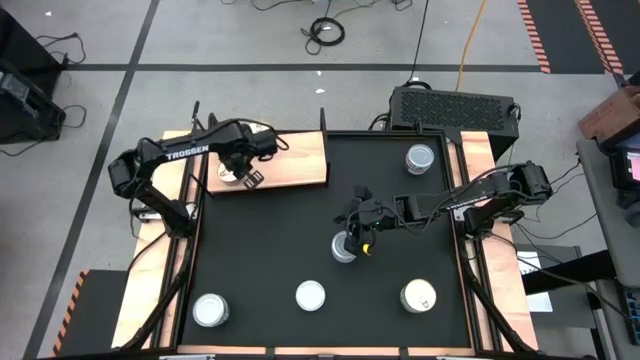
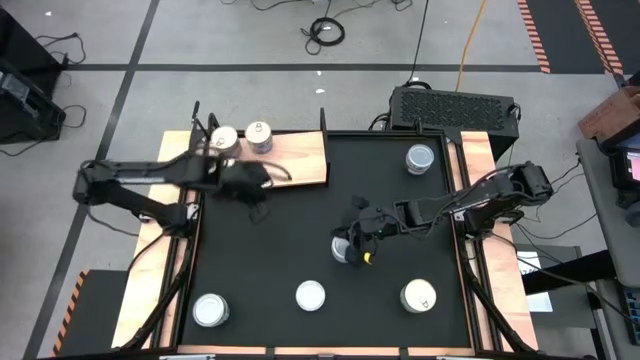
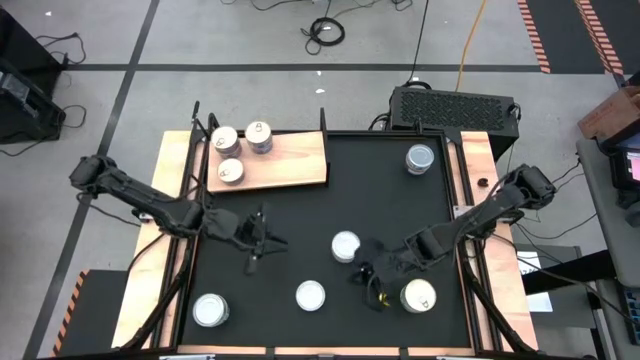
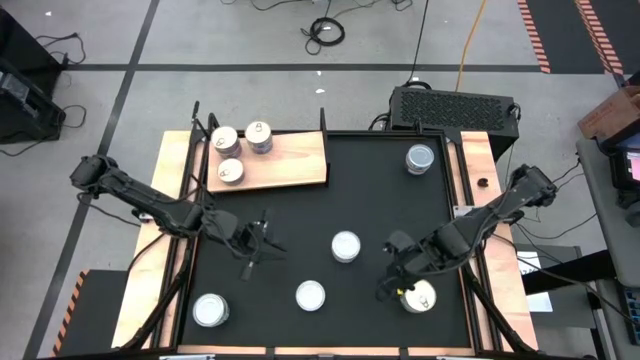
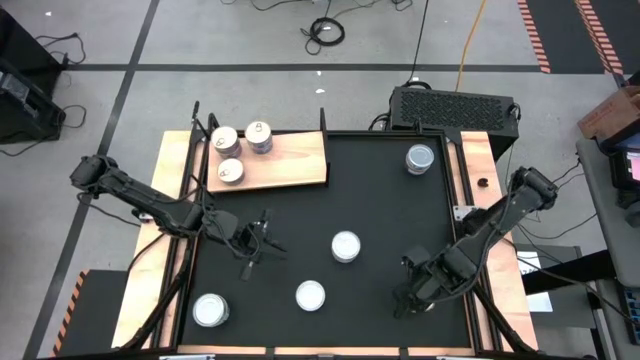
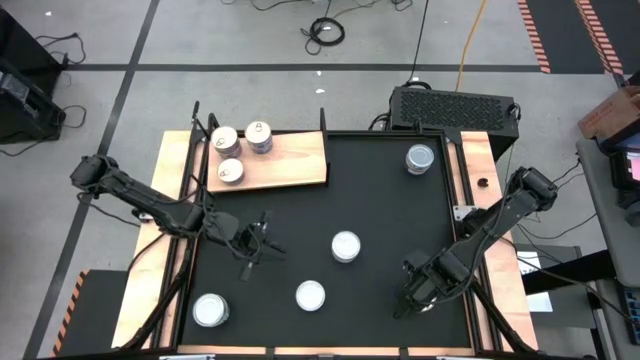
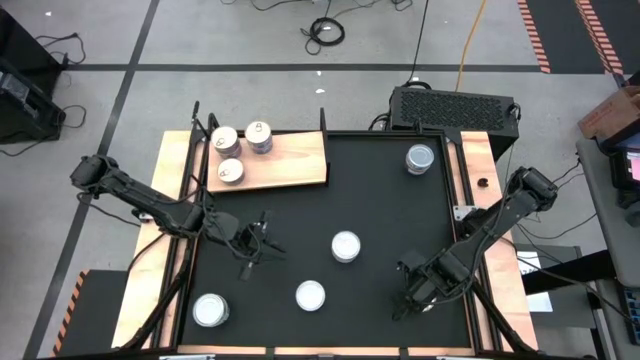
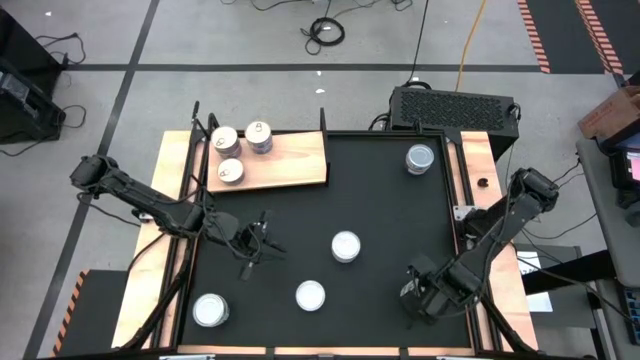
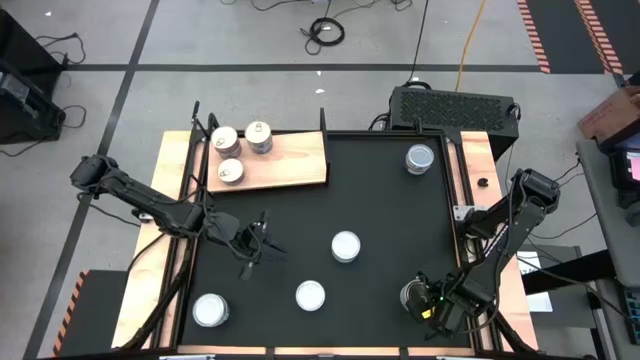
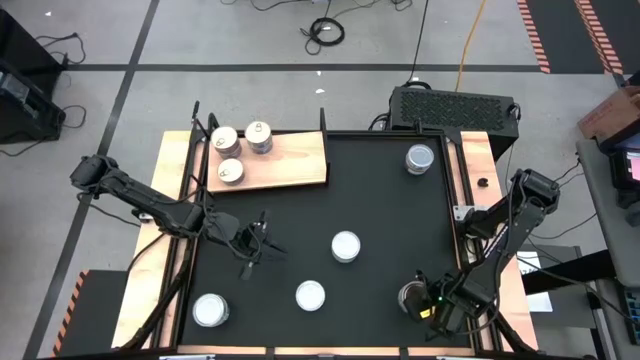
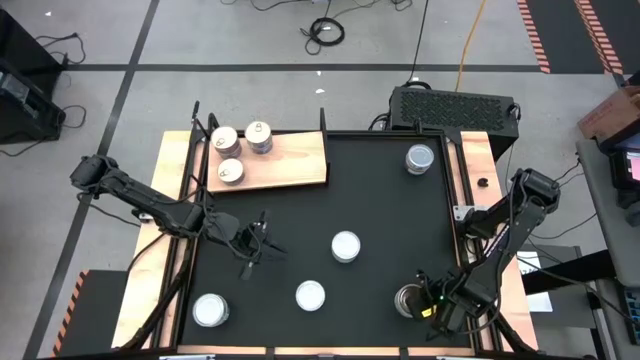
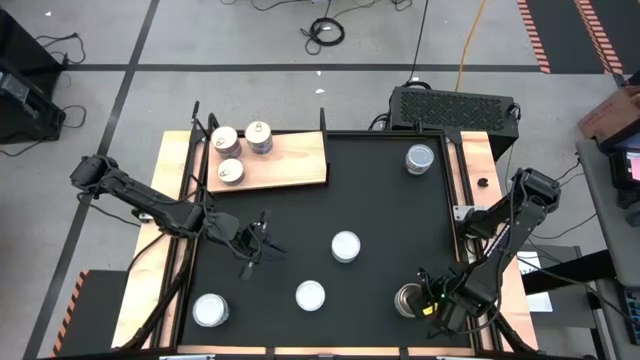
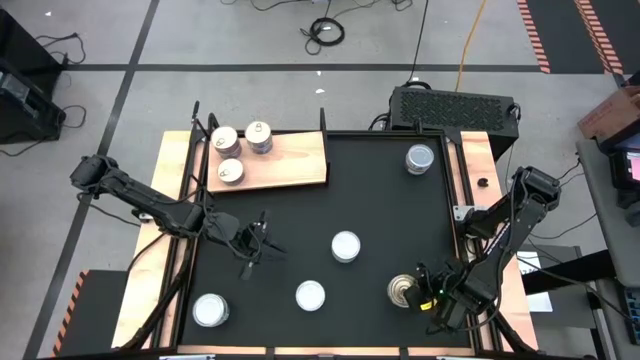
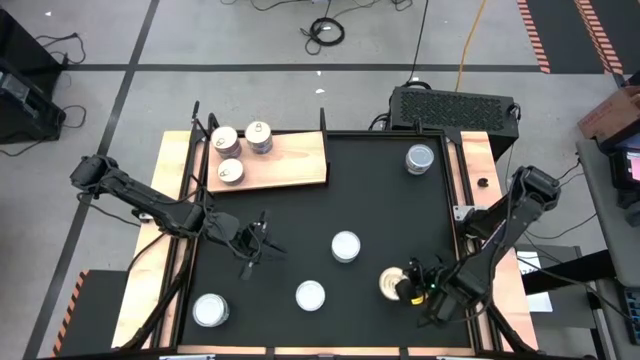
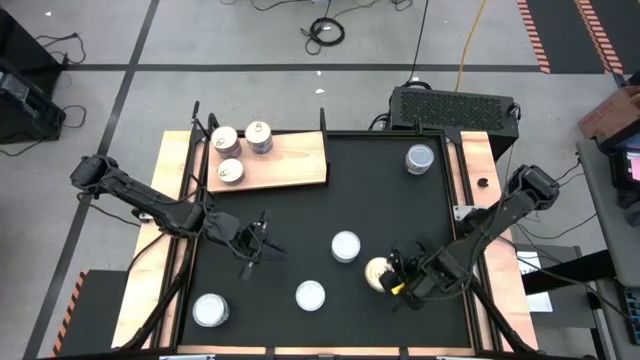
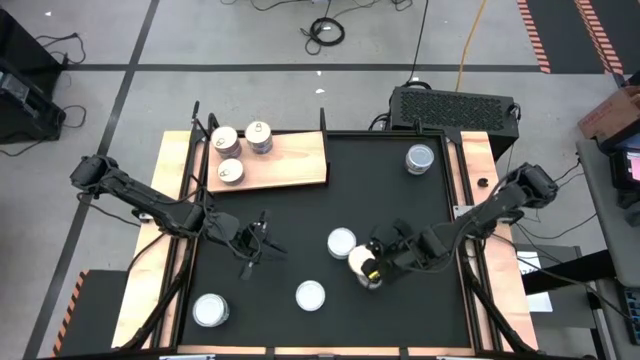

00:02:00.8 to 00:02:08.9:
Task: Stack canned seafood by type on shelf
Put the blue and pink tuna can on the shelf

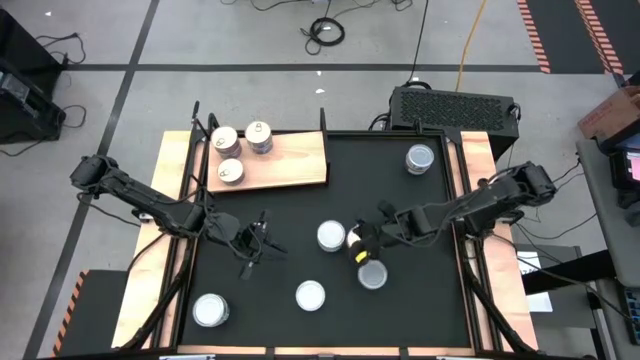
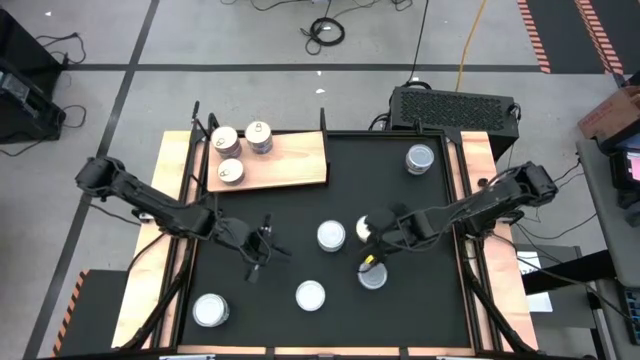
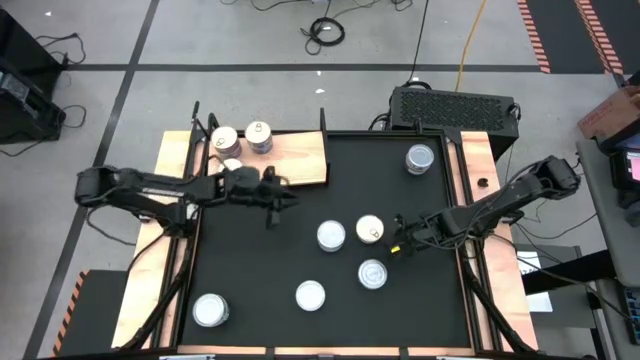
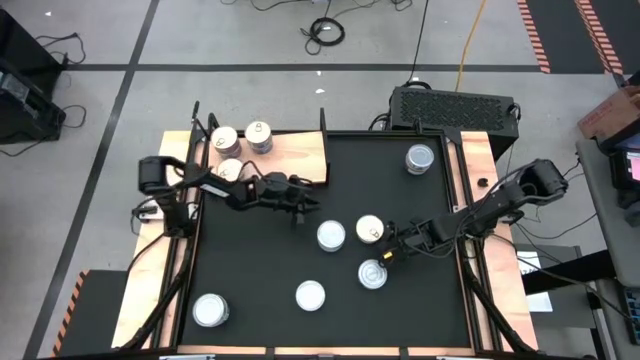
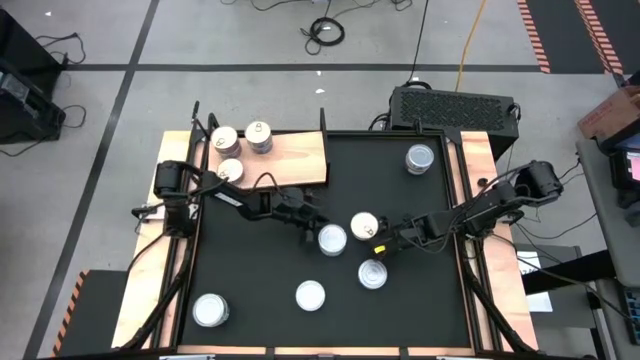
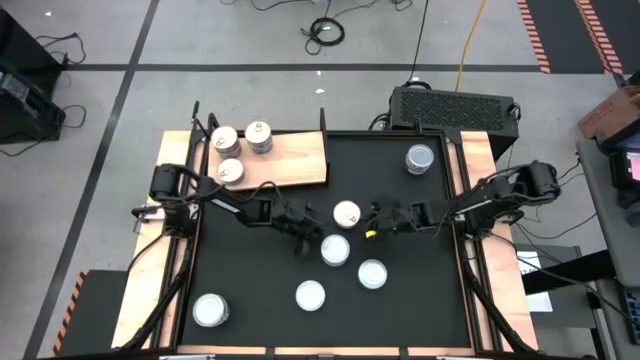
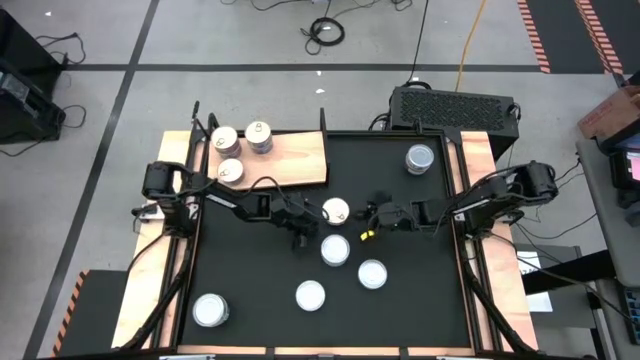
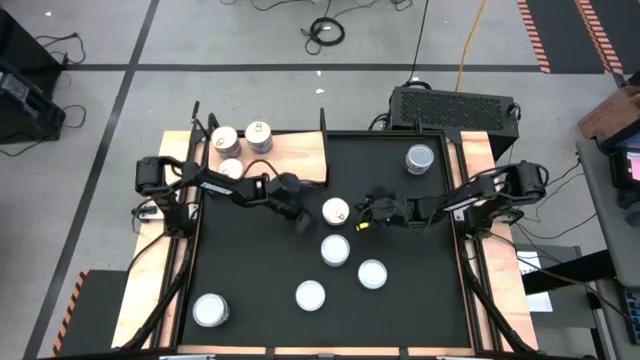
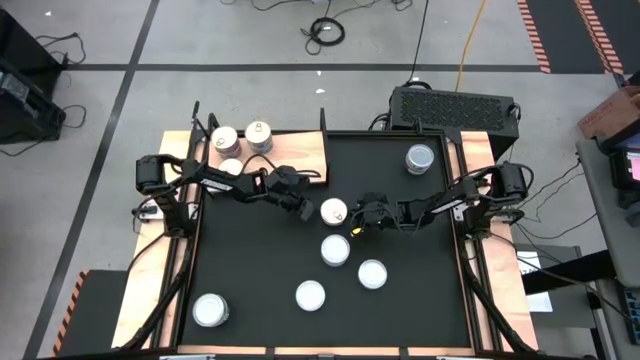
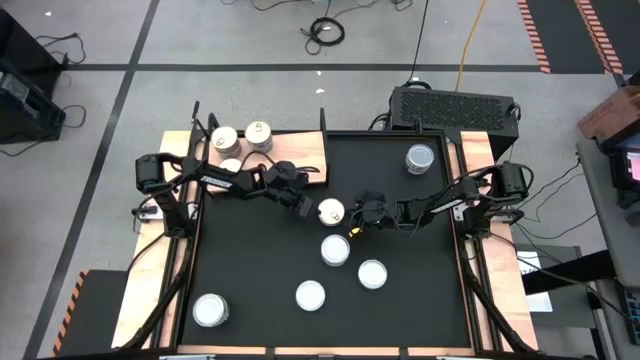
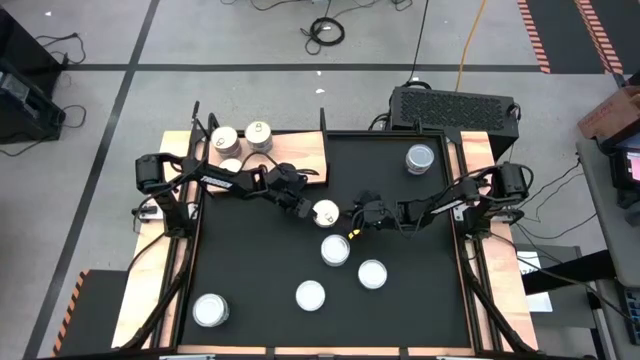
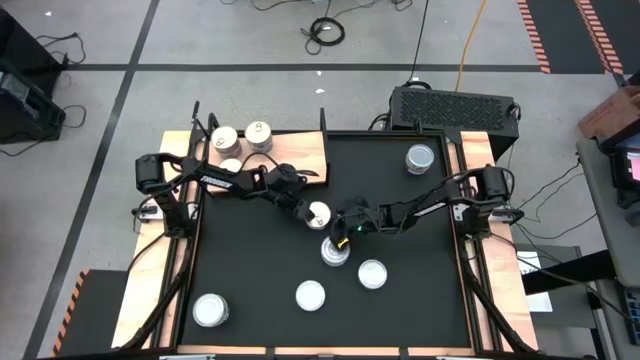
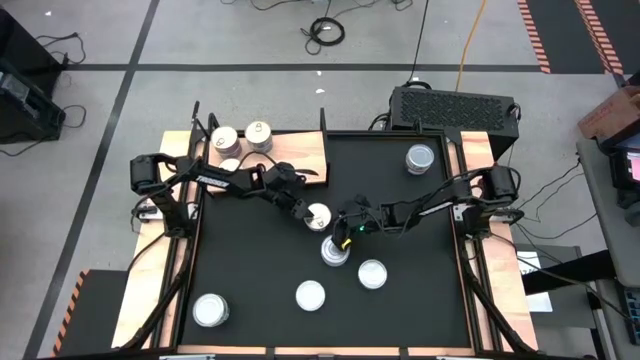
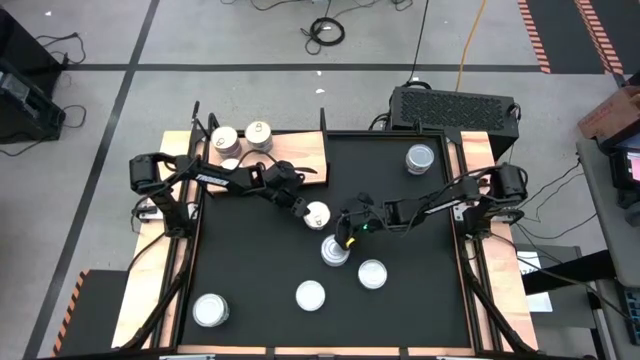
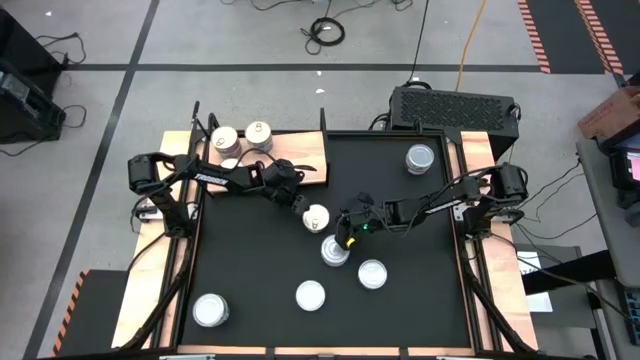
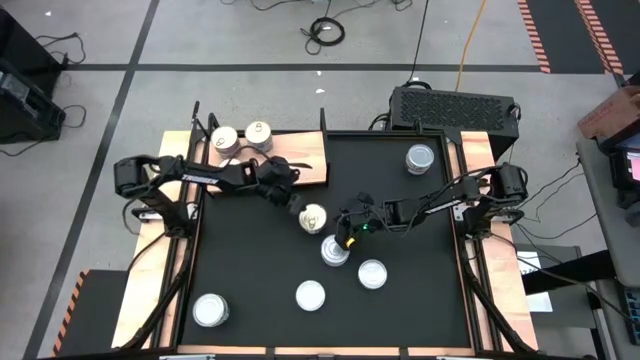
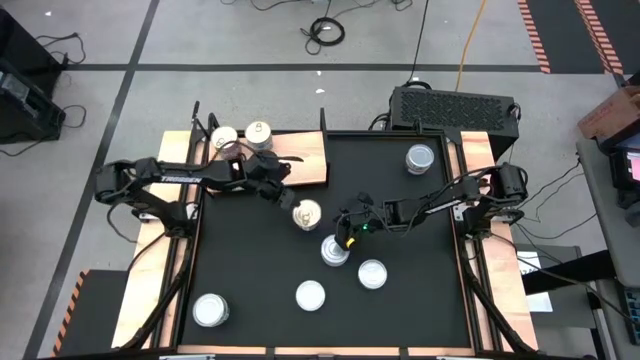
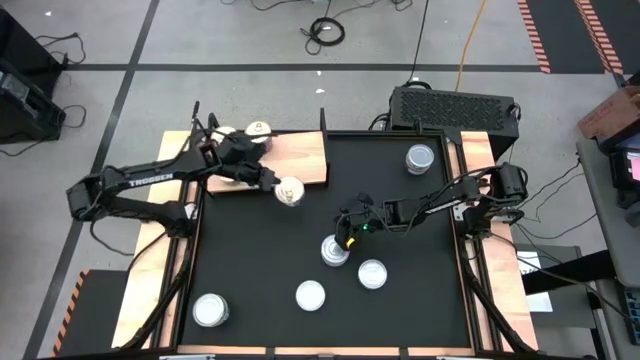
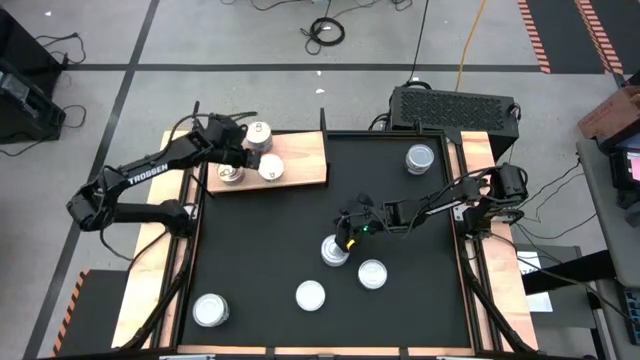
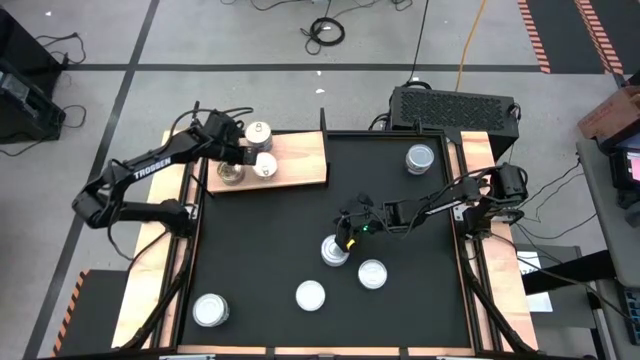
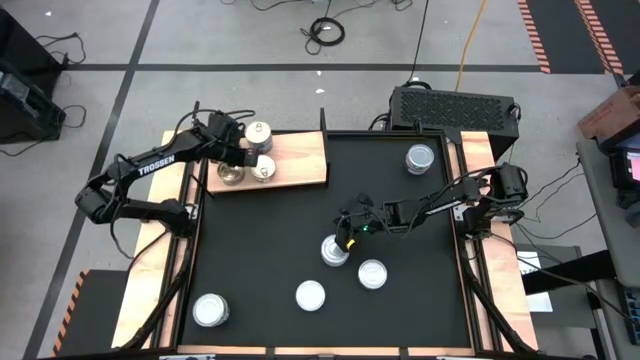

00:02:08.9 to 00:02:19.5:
Put the blue and pink tuna can on the shelf

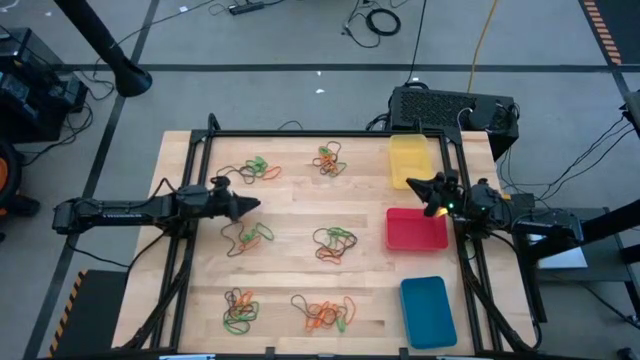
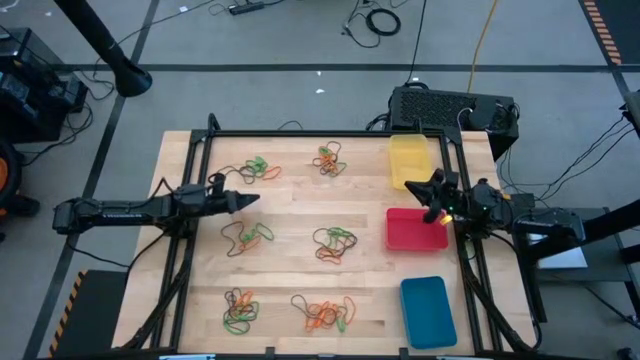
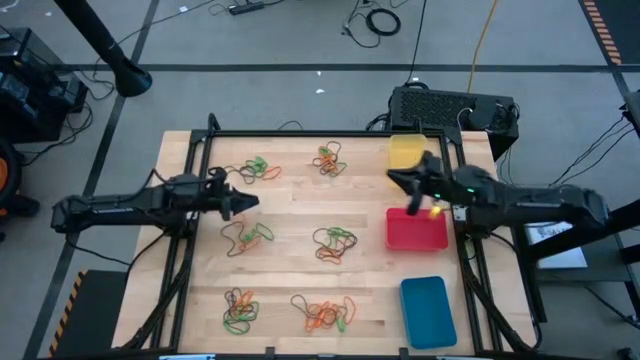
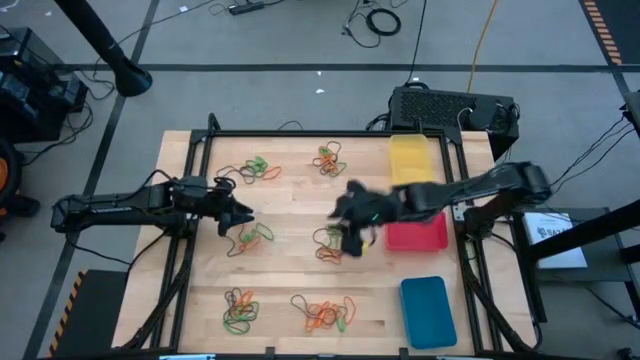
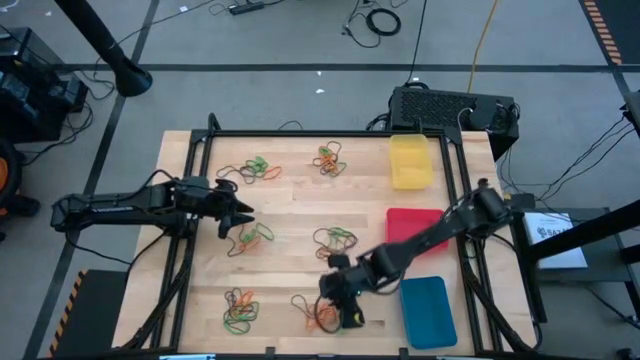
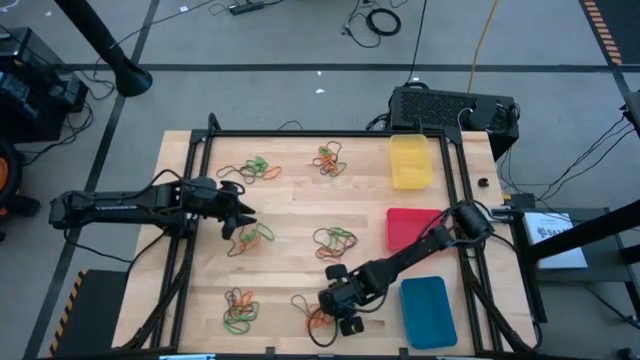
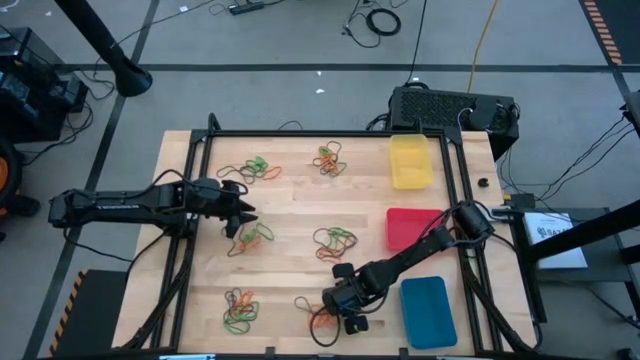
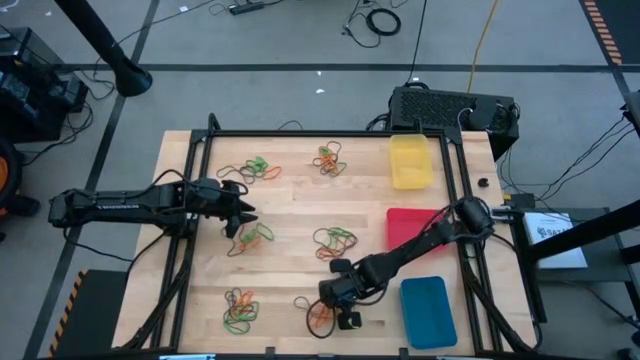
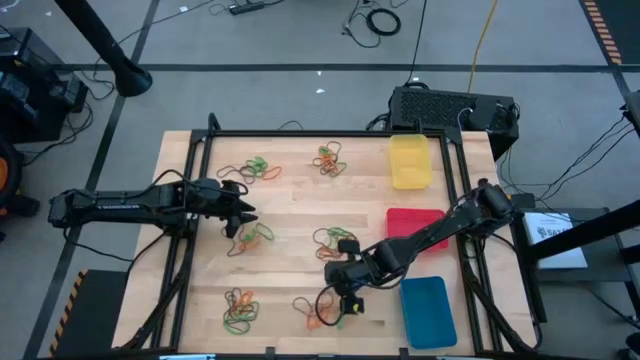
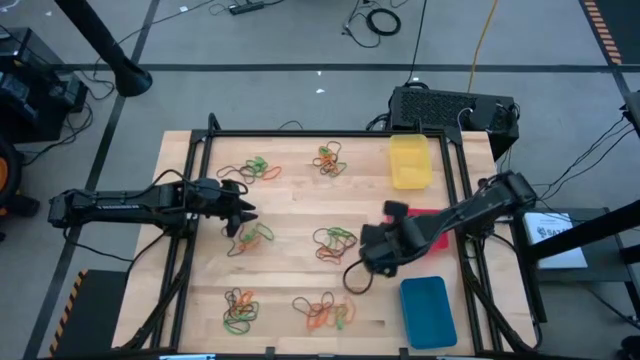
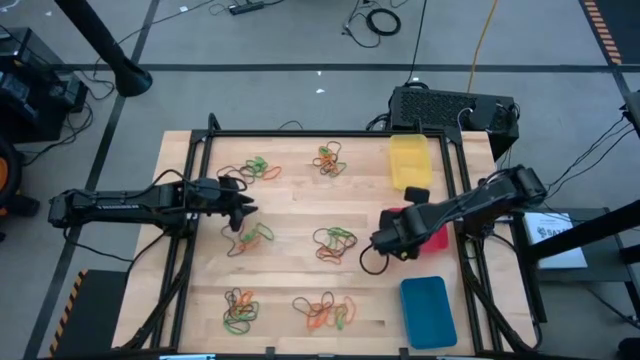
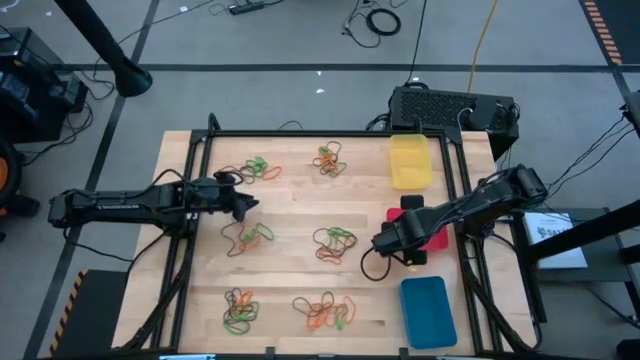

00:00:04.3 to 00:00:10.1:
Task: Sort rubber bands into baskets
Put the orange rubber band into the red bin
